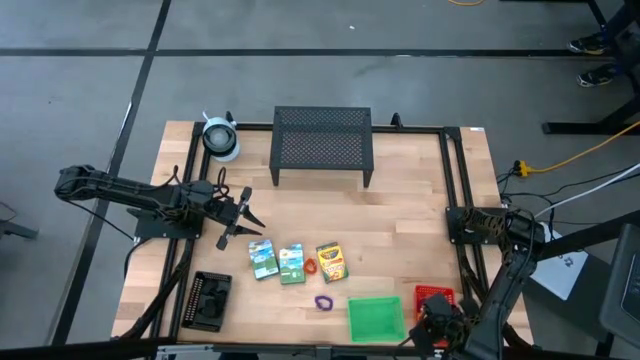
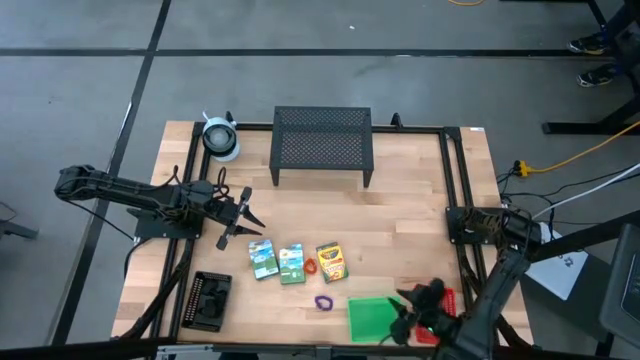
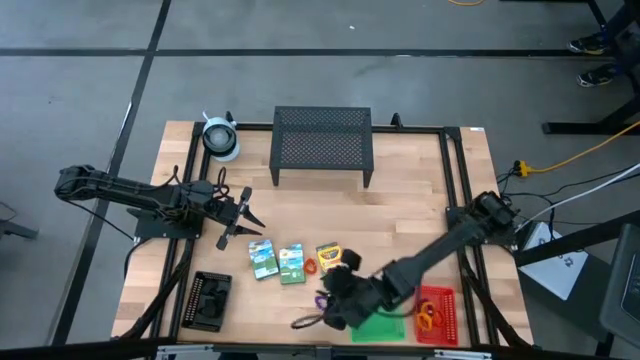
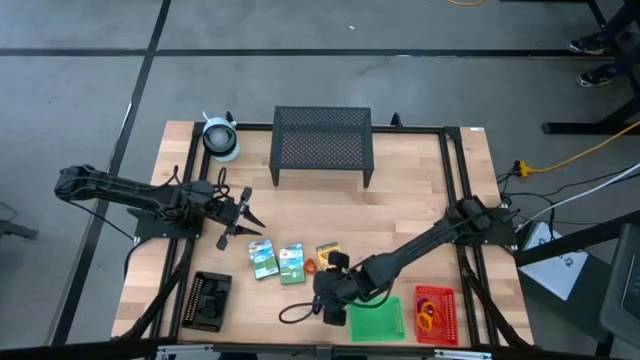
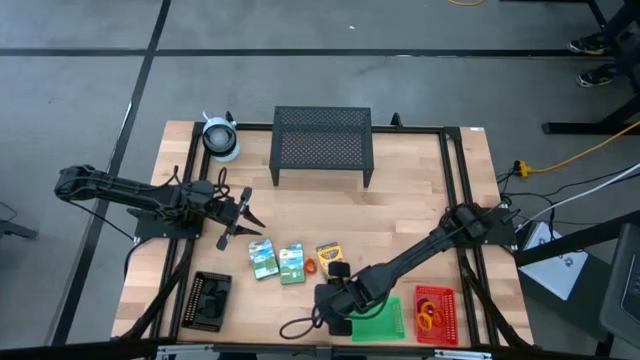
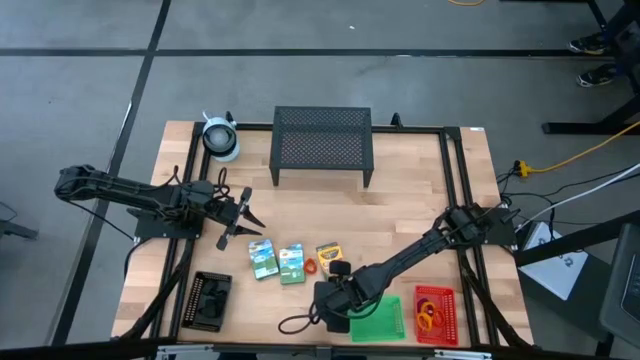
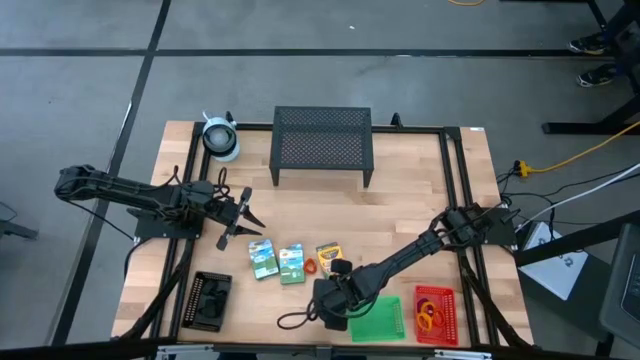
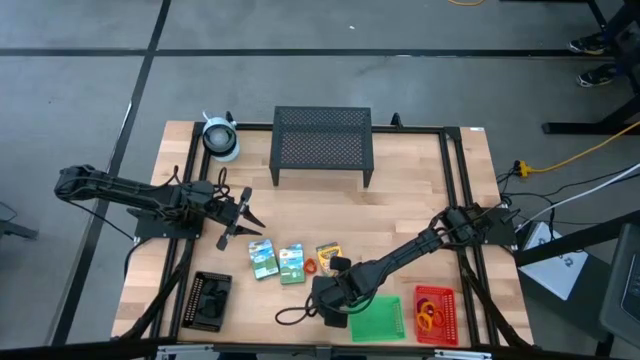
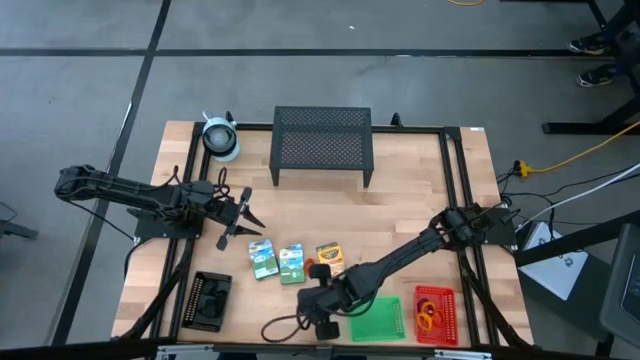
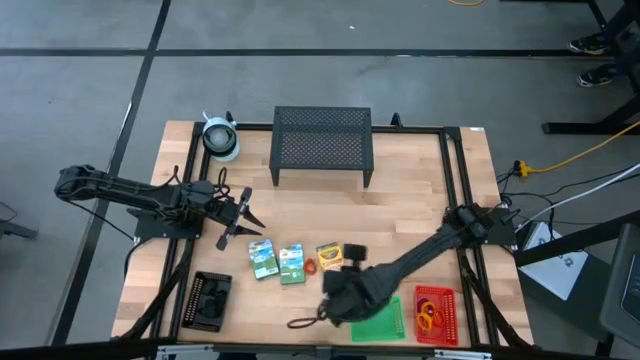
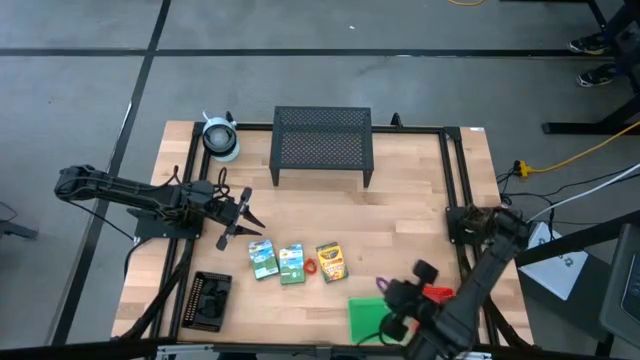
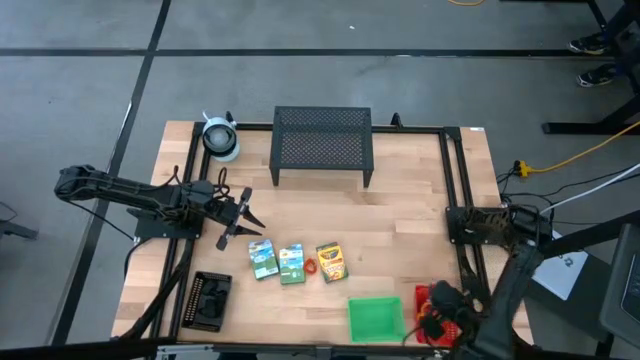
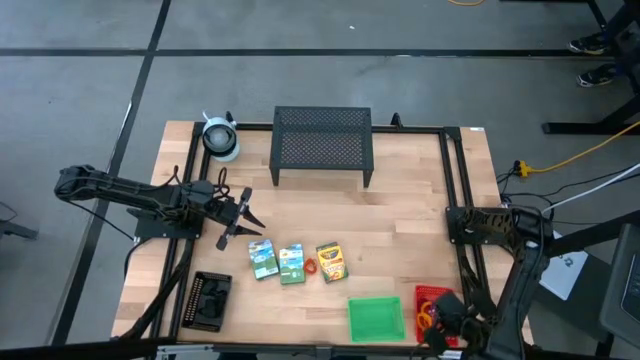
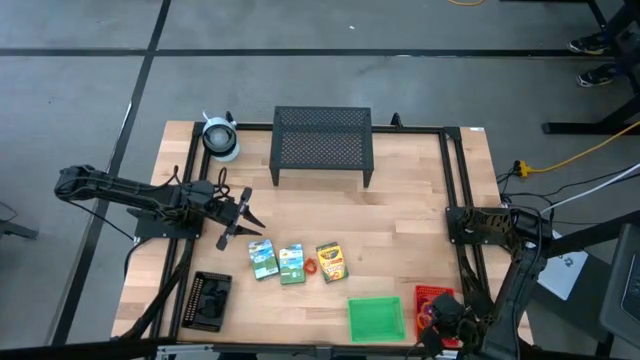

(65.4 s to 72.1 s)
Task: Pick & Place Office Desk Supplies
Put the purple spring keychain into the red bin

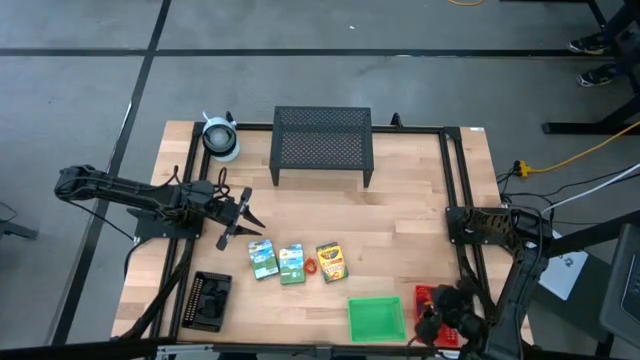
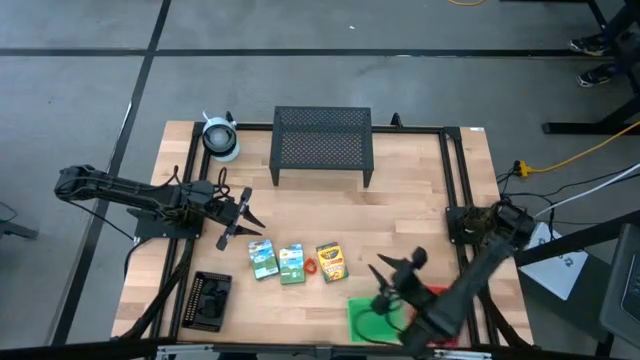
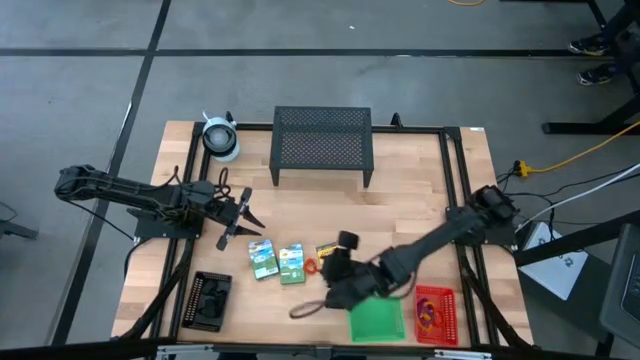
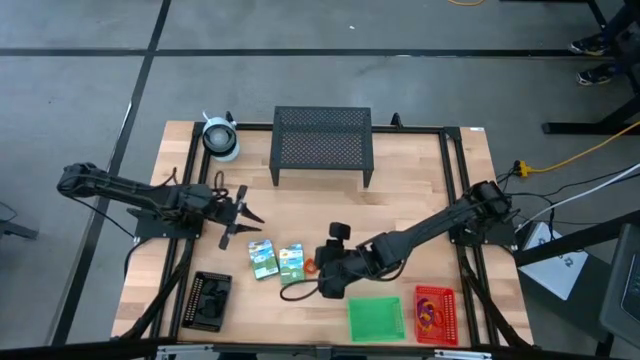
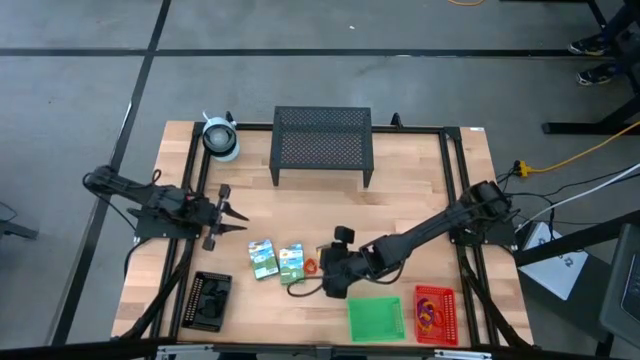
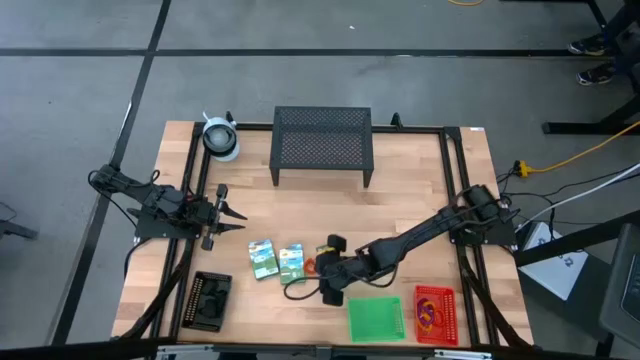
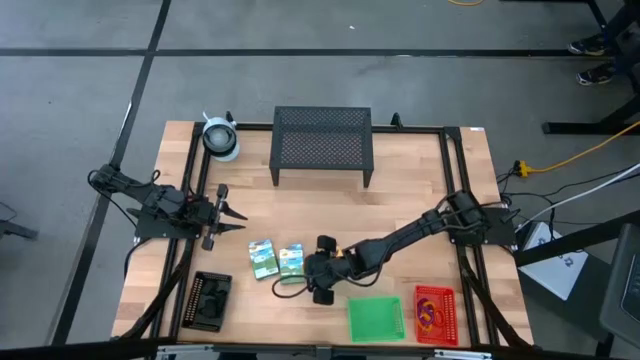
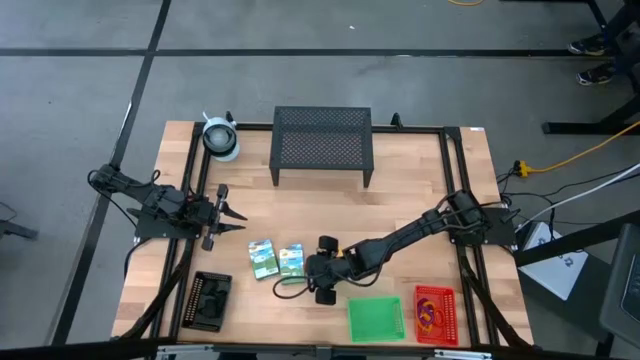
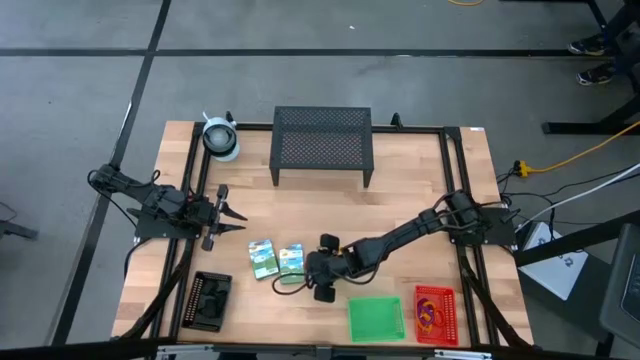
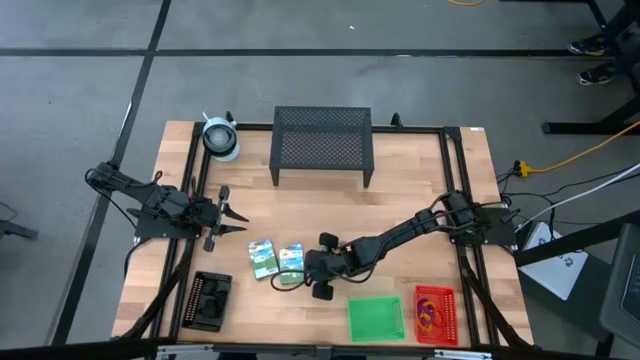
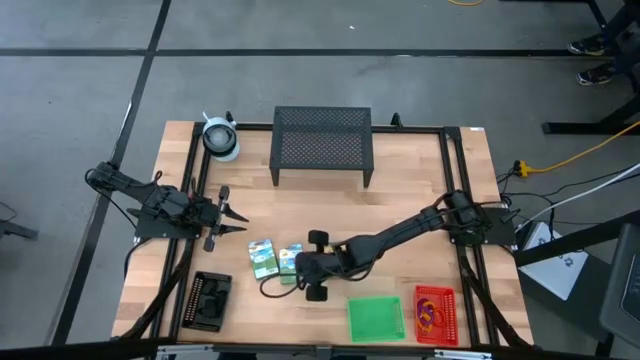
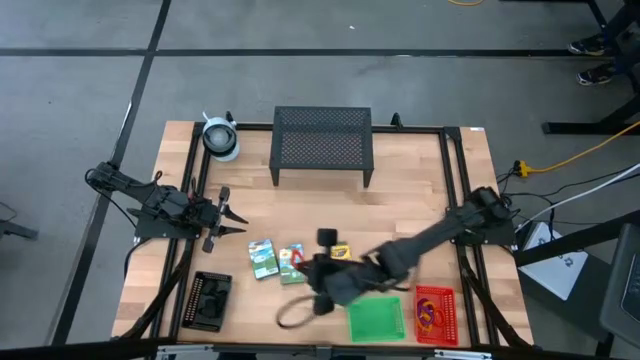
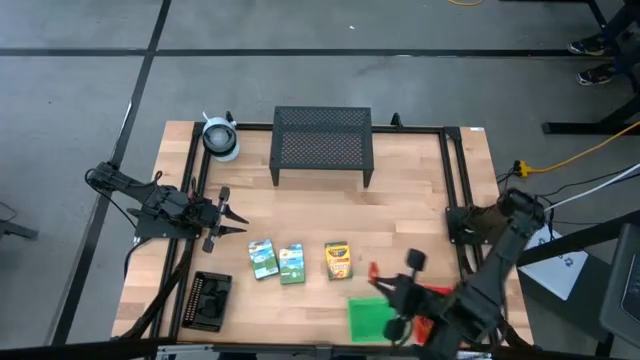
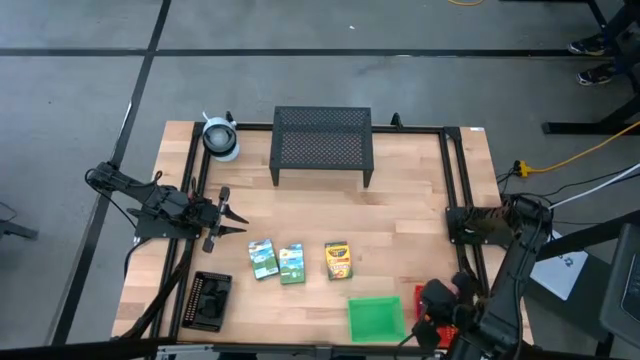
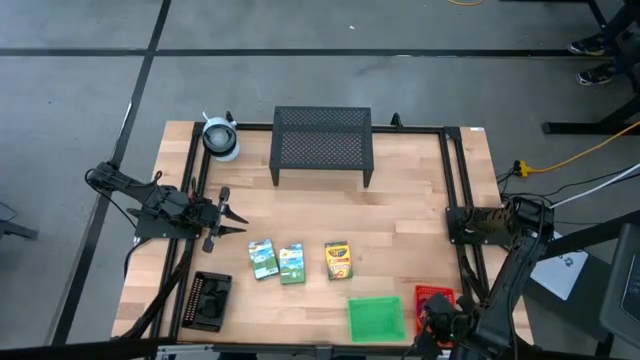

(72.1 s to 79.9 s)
Put the orange spring keychain into the red bin

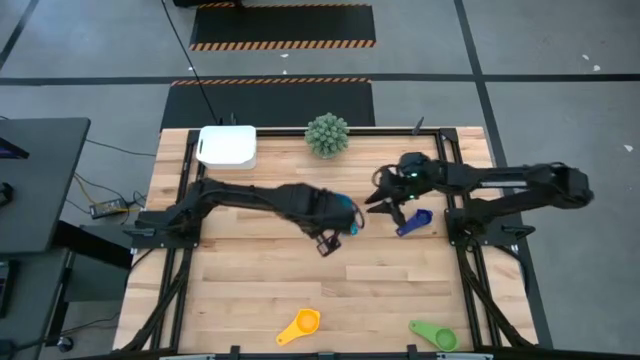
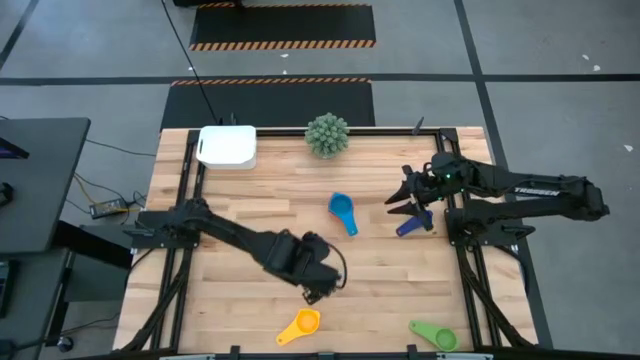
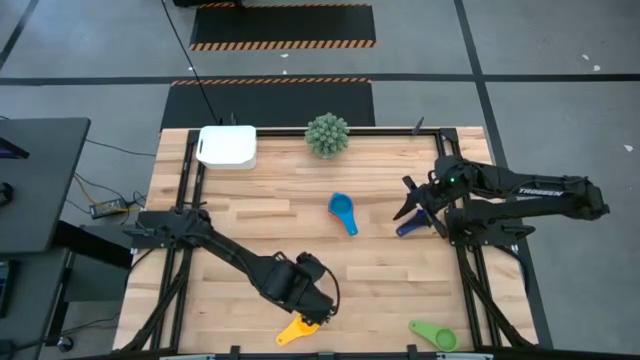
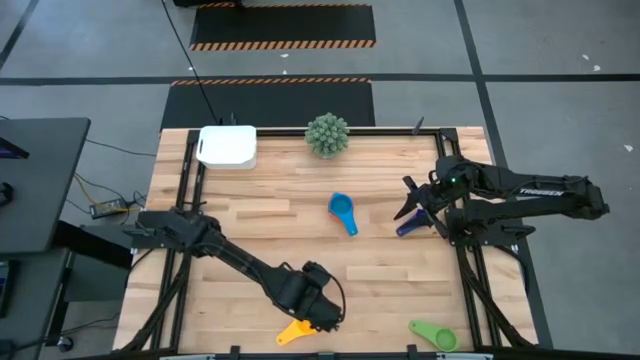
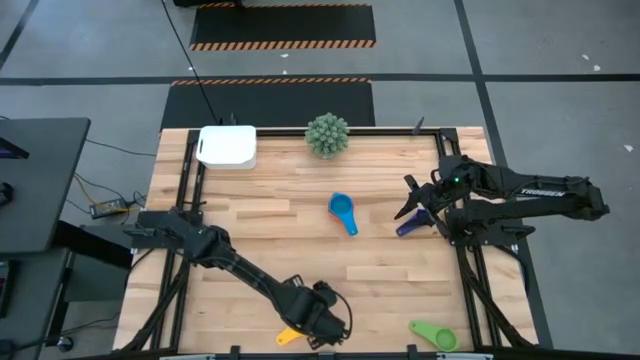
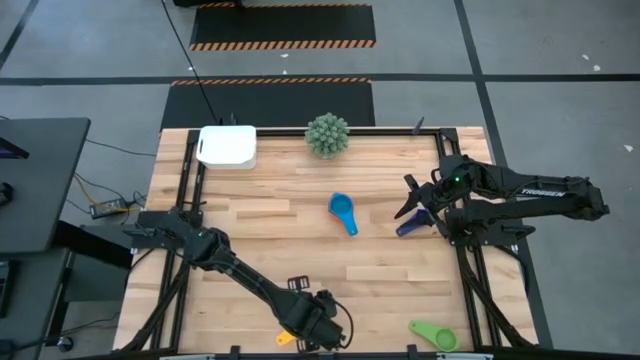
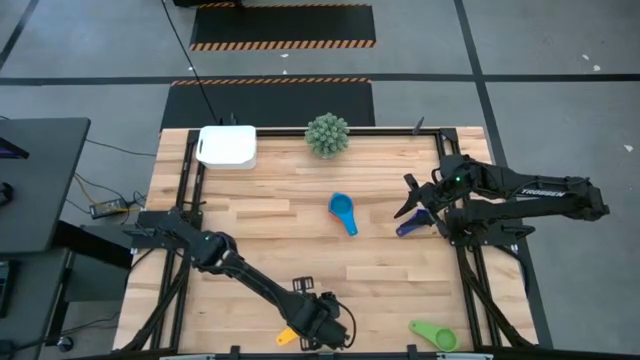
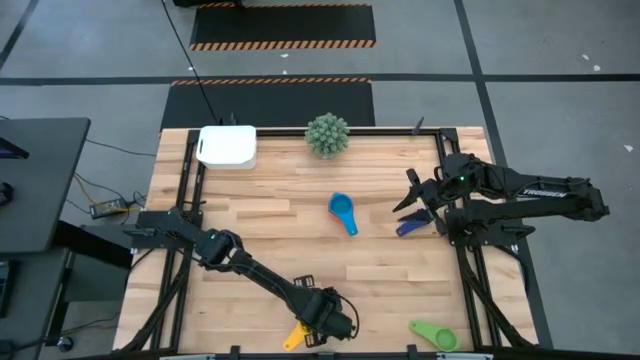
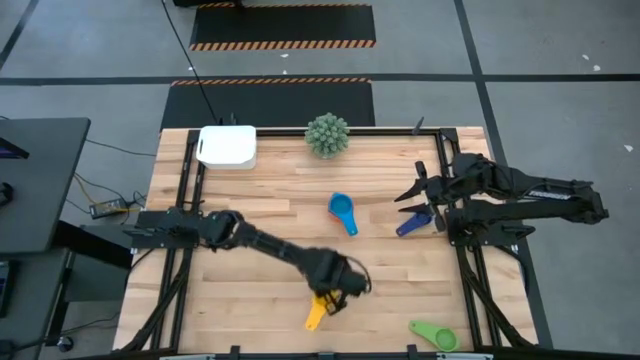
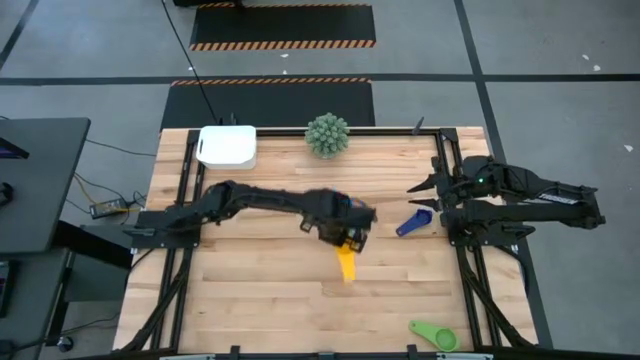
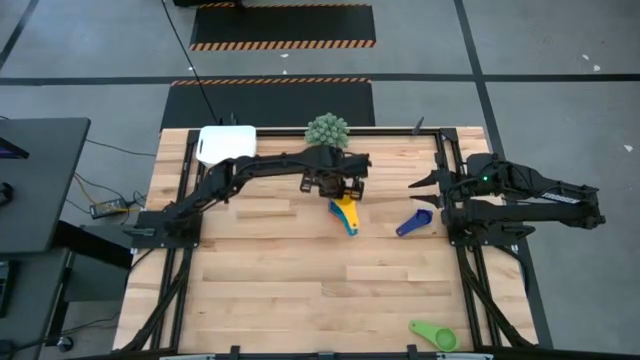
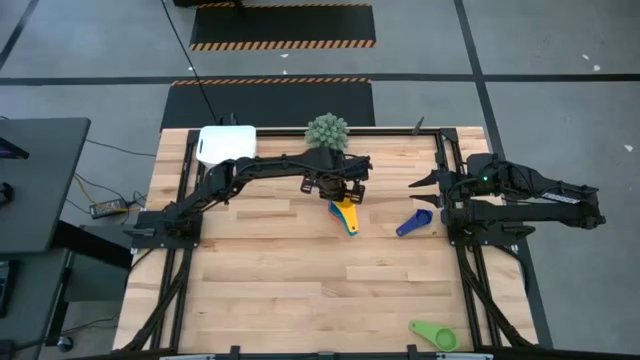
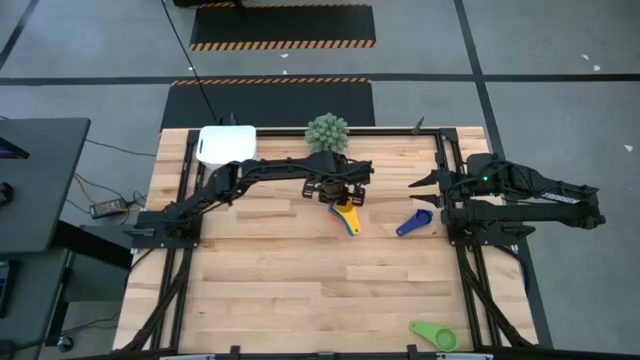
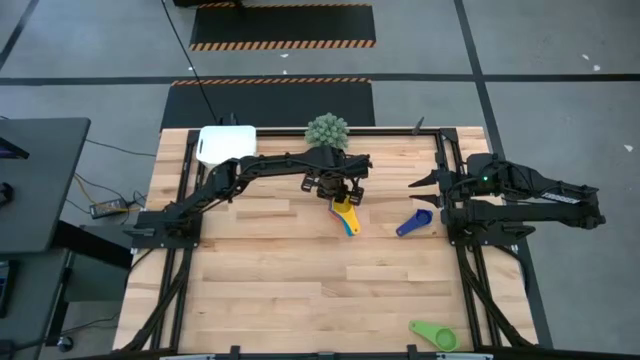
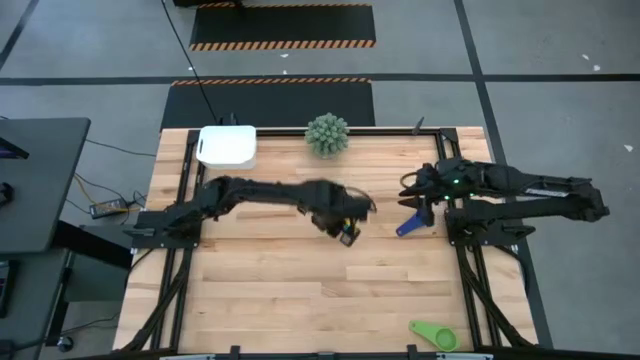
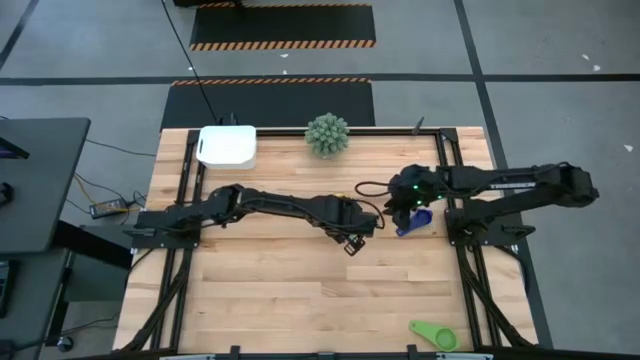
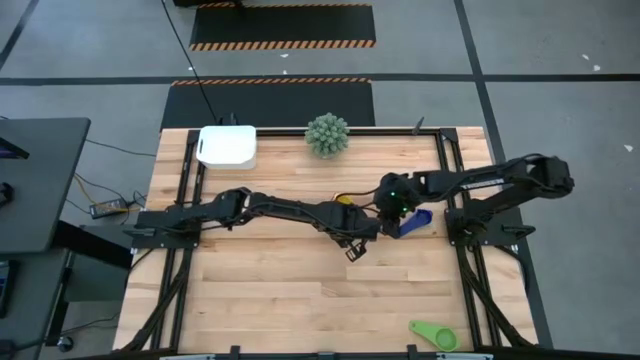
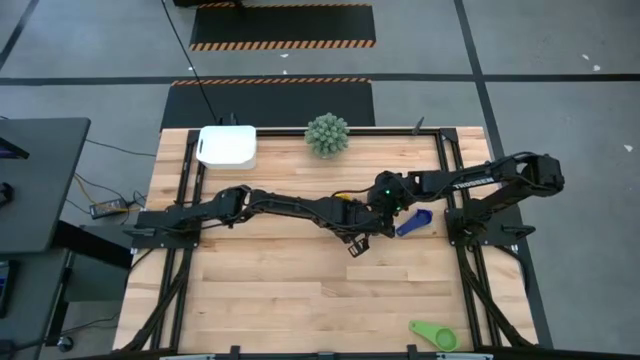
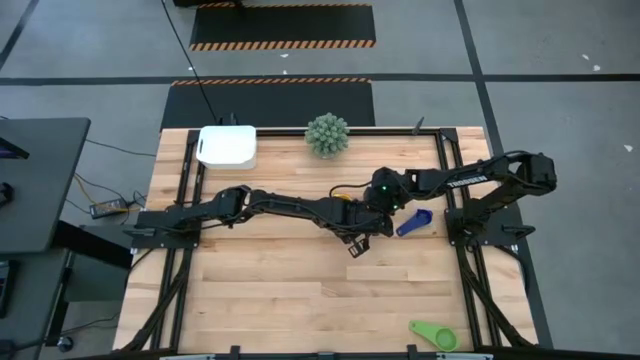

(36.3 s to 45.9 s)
Task: Nest measuring cups in basket
Stack the yellow measuring cup on top of the light blue measuring cup
